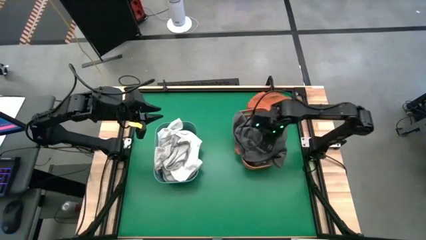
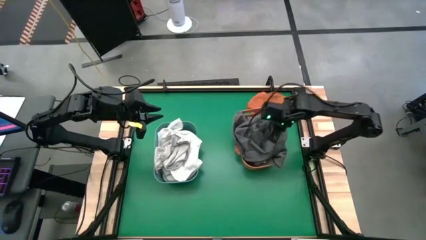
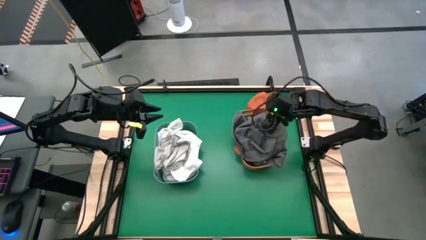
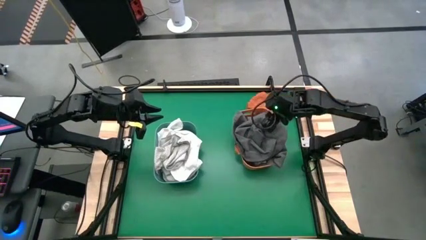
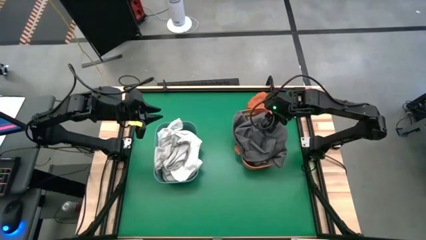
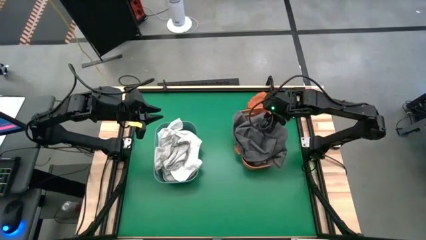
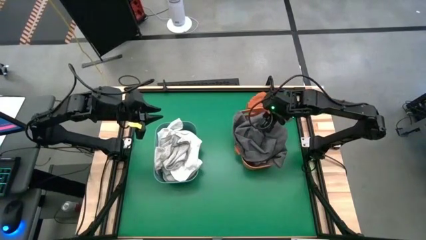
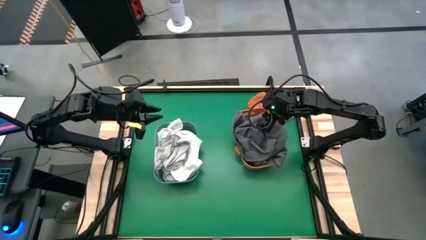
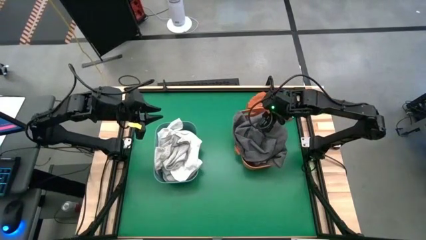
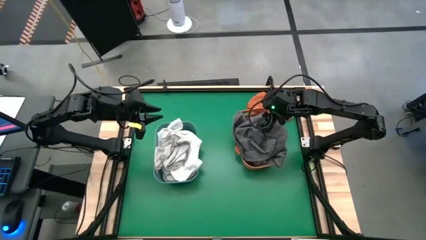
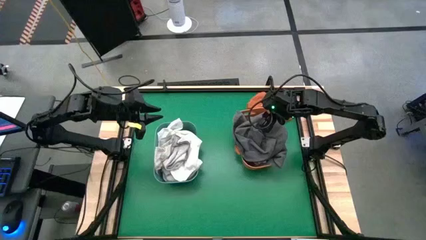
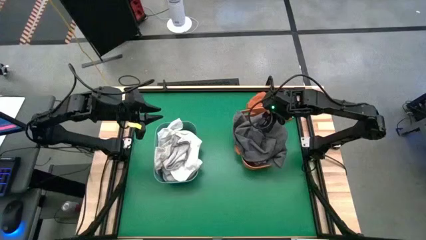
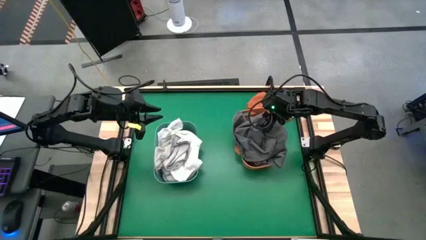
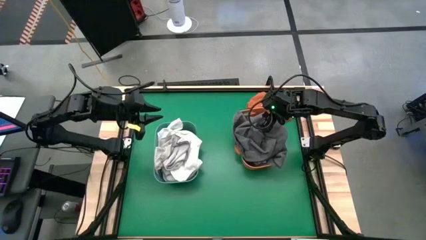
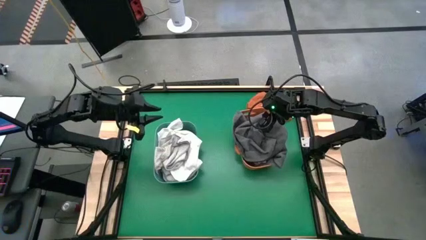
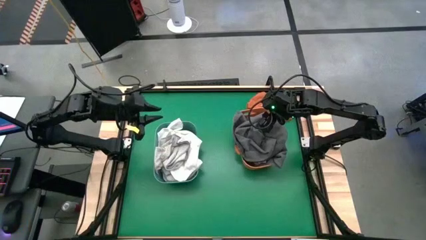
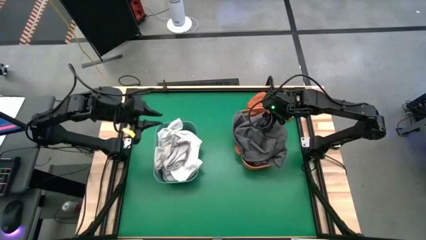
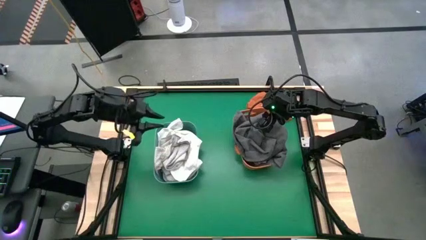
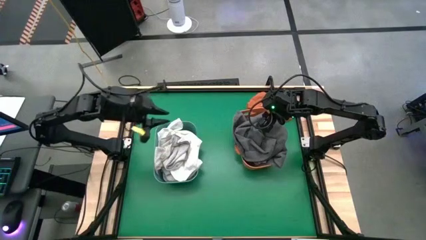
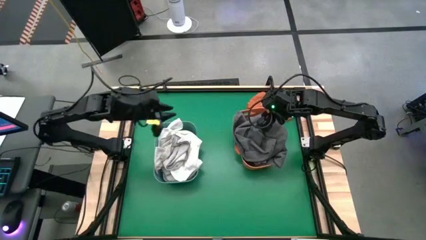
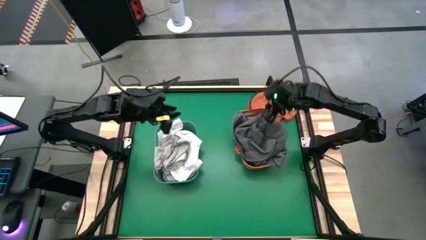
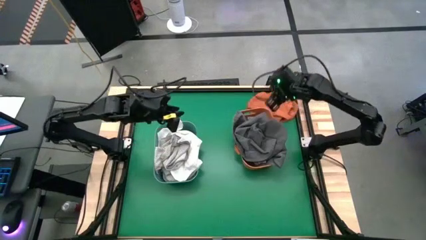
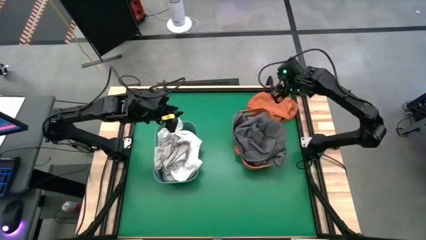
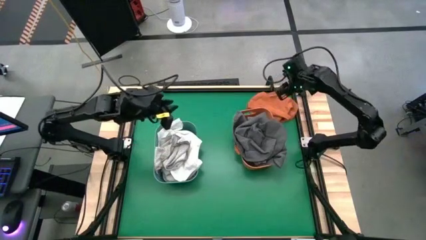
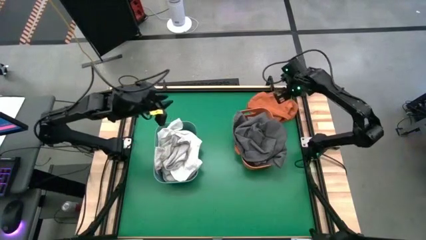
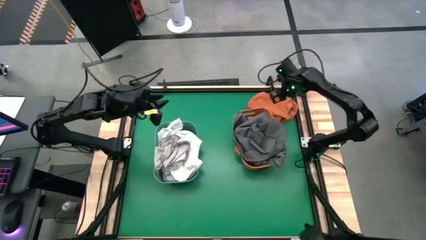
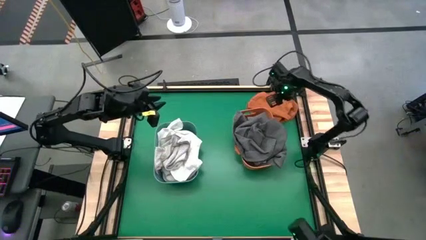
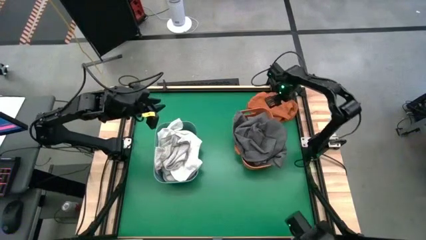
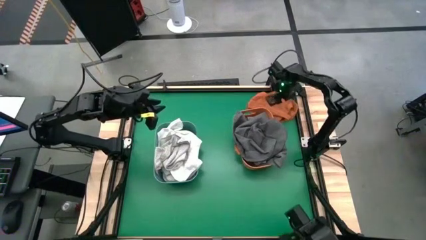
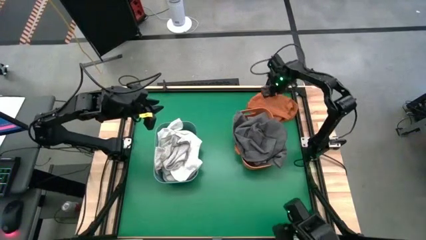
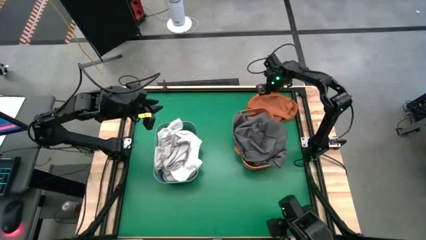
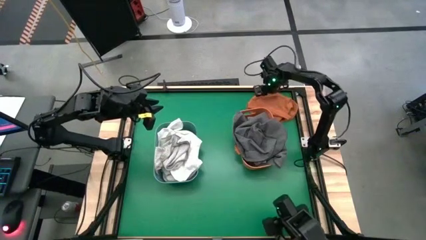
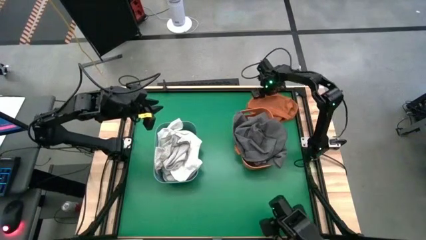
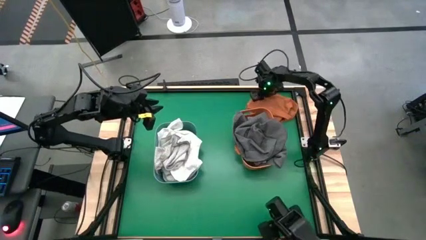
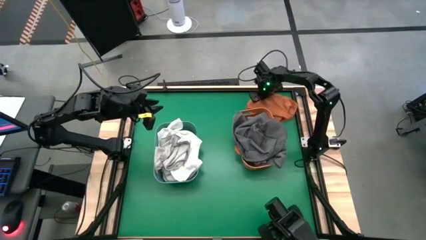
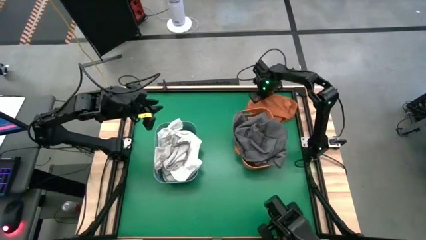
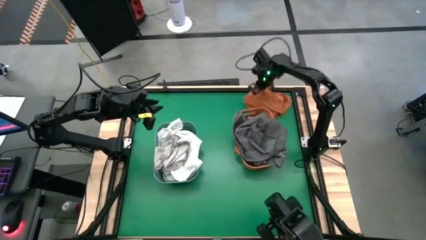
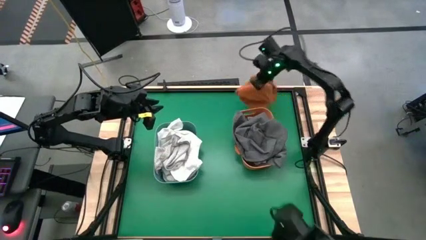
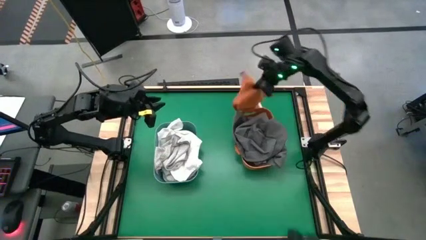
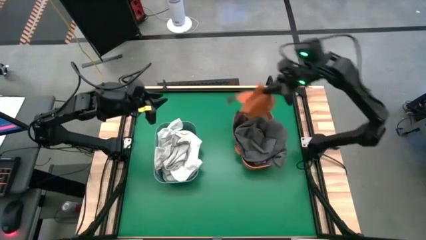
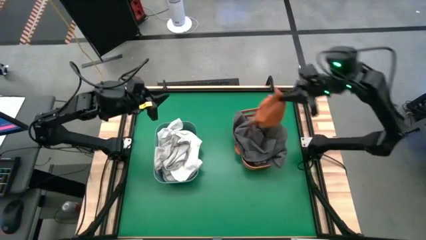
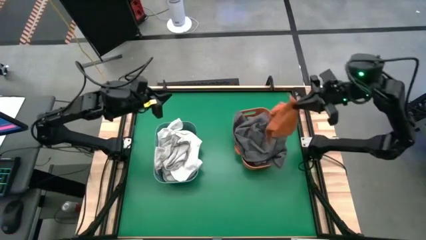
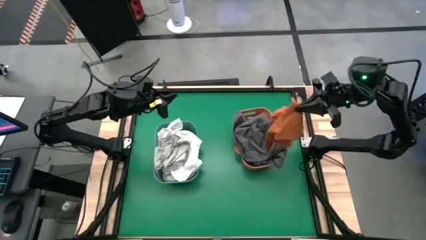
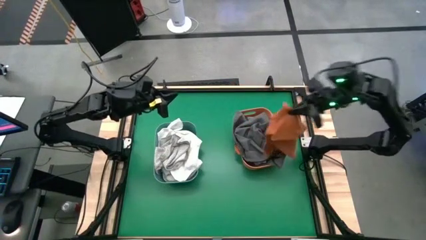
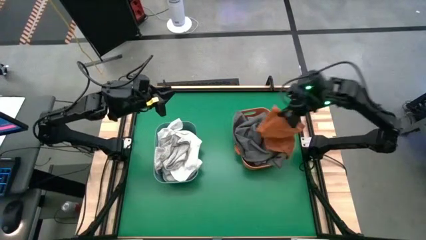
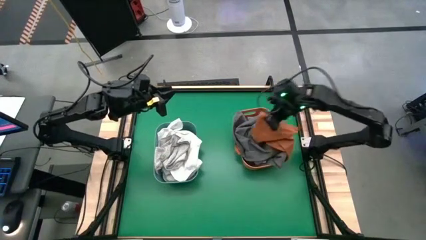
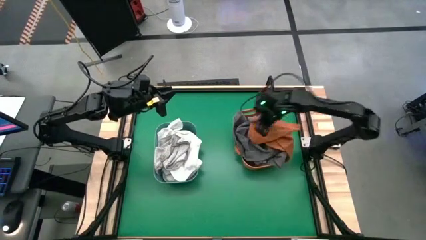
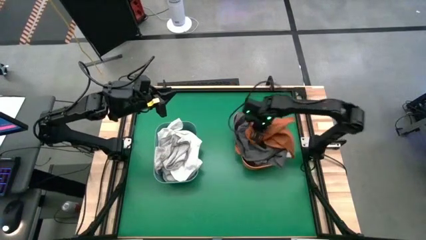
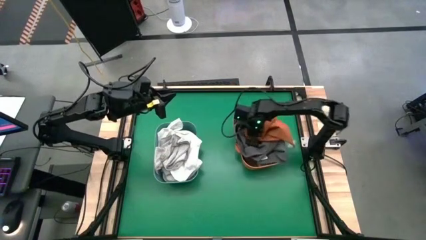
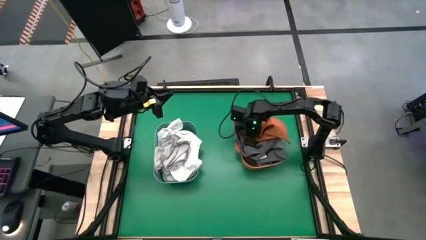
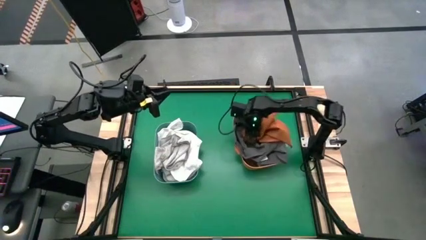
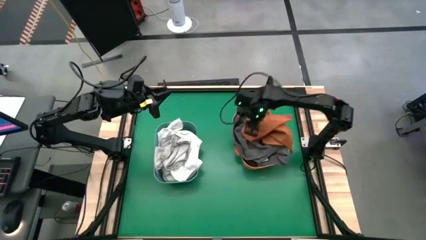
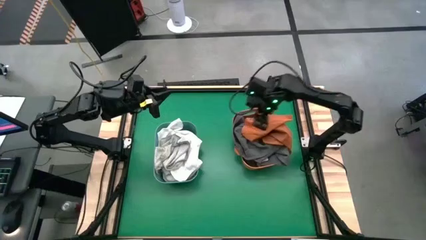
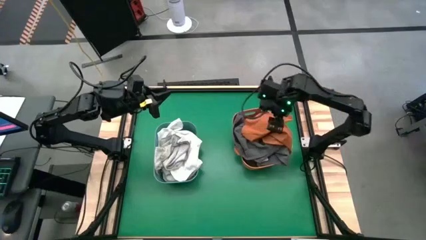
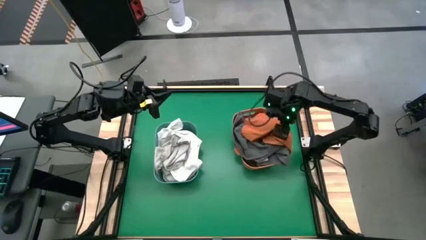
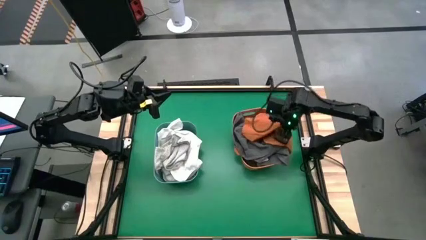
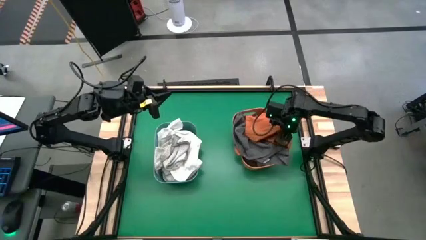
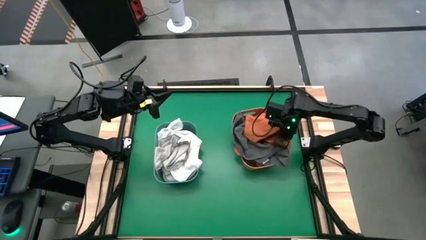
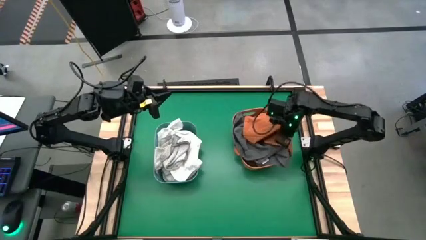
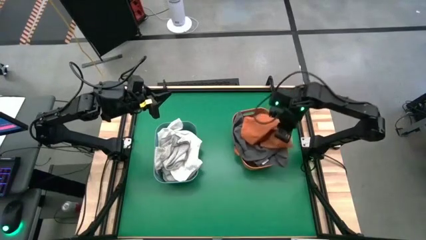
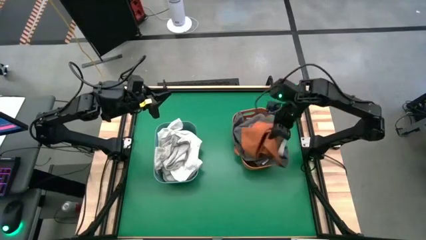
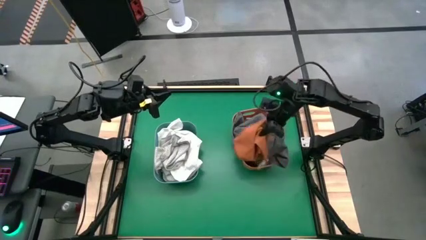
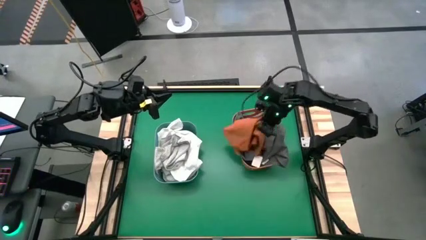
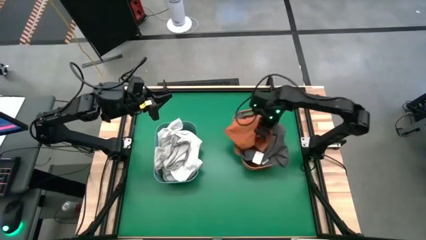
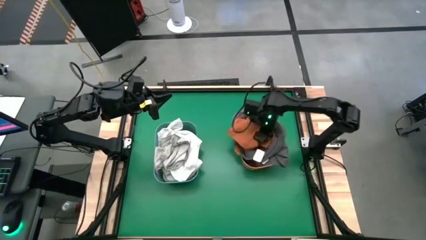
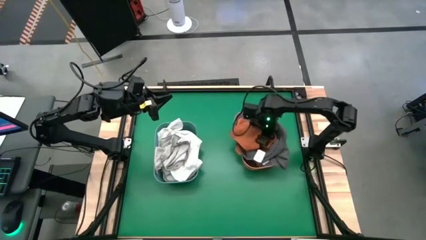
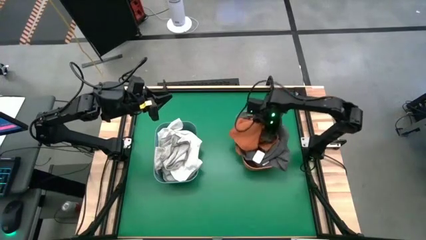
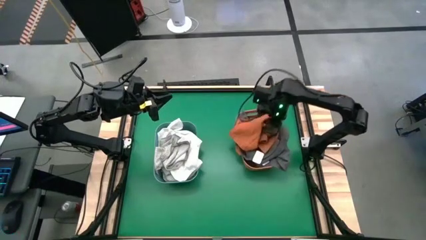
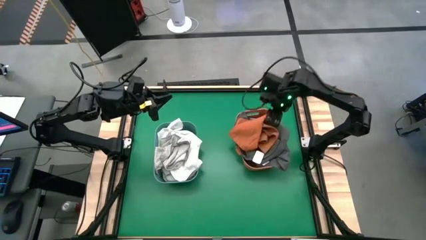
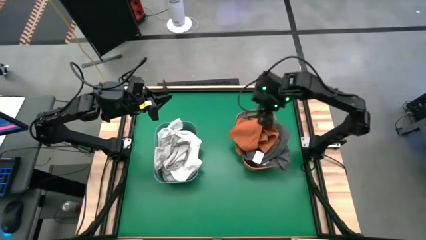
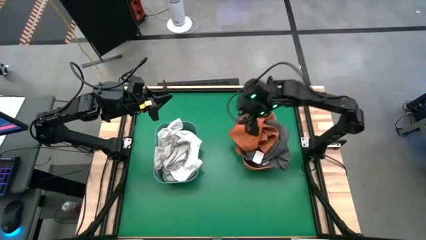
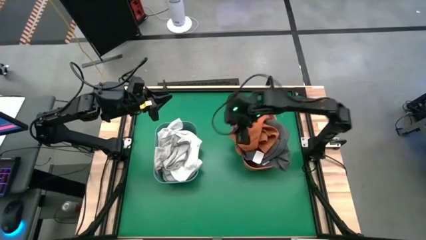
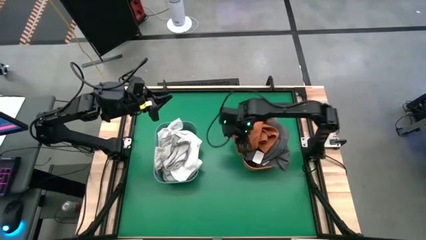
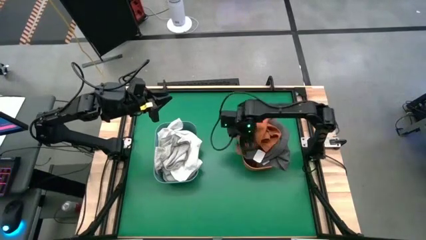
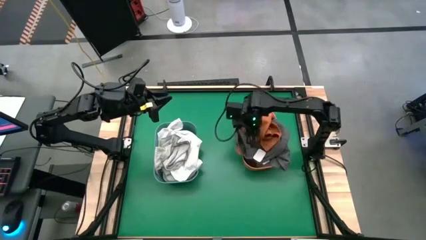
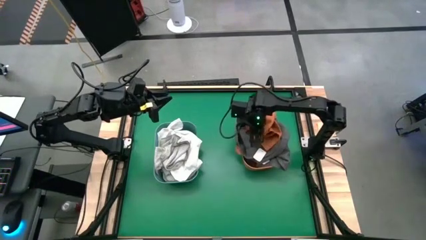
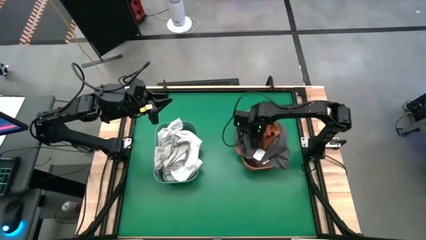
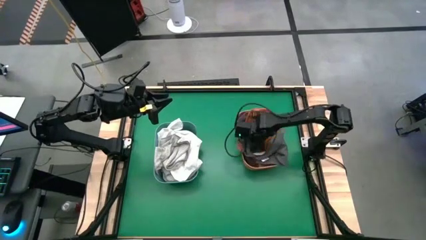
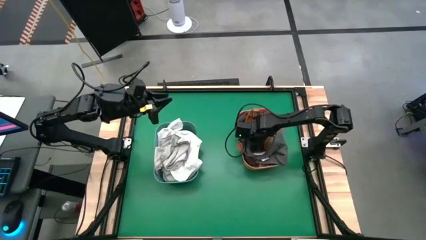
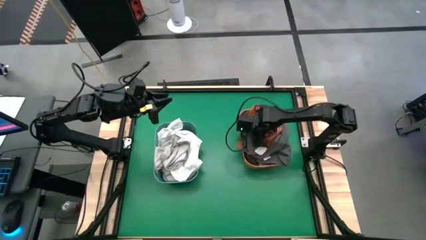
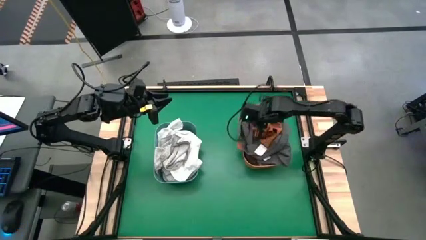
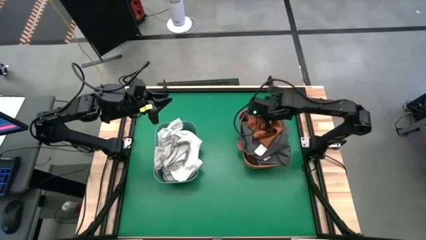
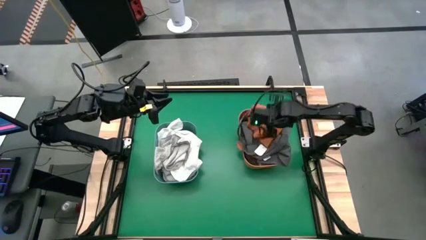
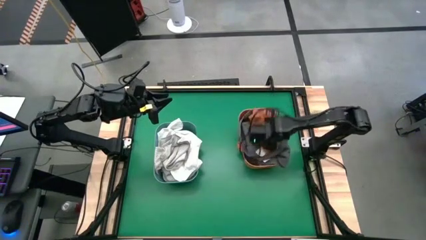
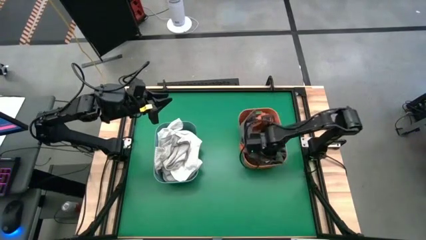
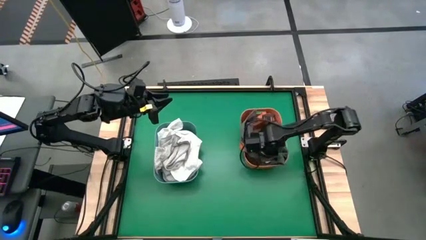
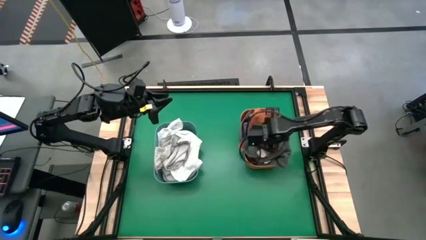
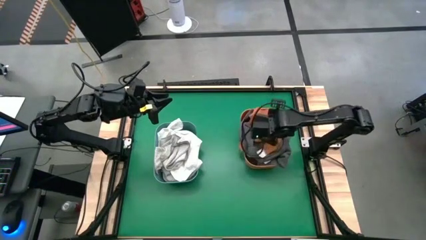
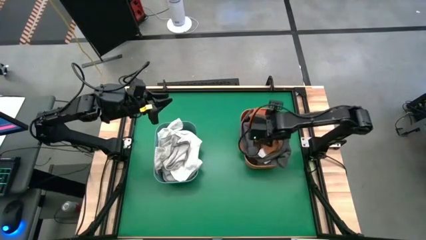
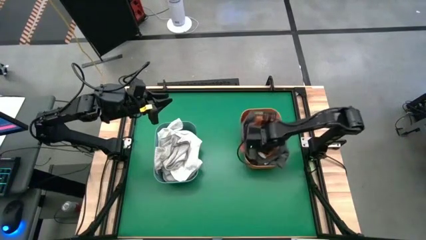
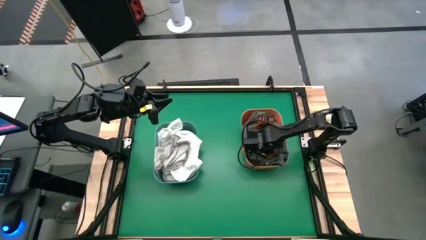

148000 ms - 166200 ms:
Task: Sort towels by color in basket
Put the orange towel into the orange bin
